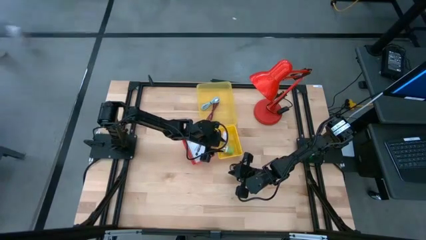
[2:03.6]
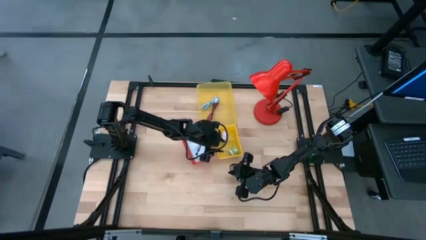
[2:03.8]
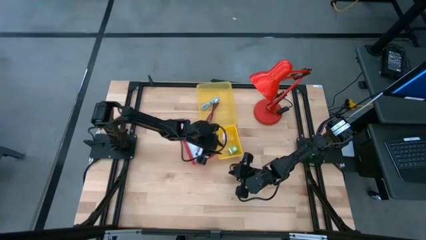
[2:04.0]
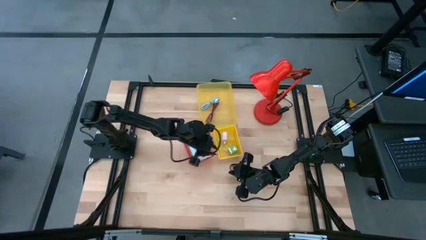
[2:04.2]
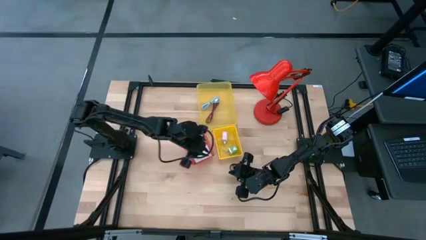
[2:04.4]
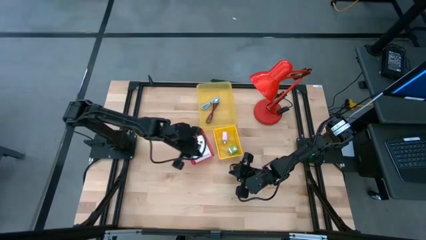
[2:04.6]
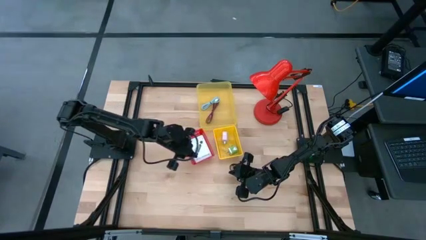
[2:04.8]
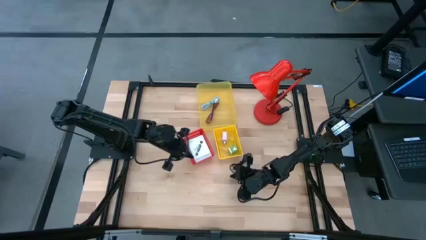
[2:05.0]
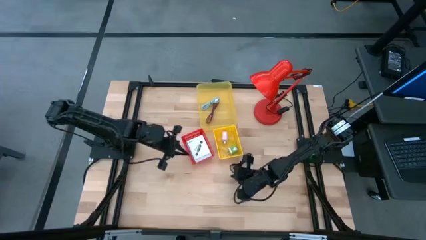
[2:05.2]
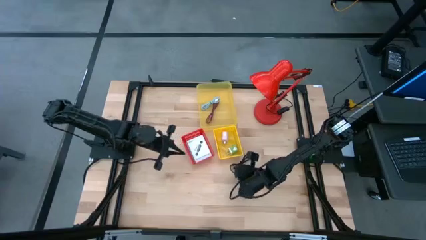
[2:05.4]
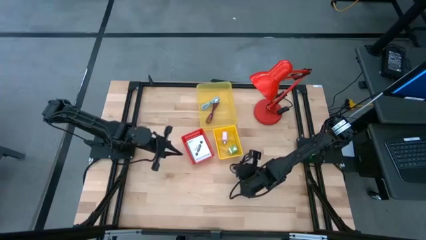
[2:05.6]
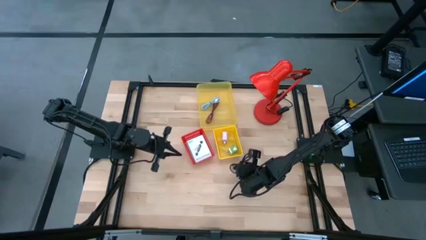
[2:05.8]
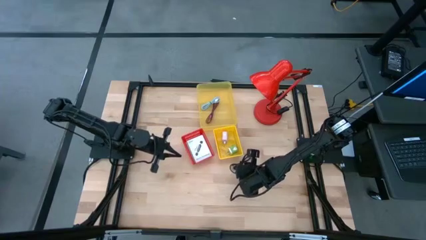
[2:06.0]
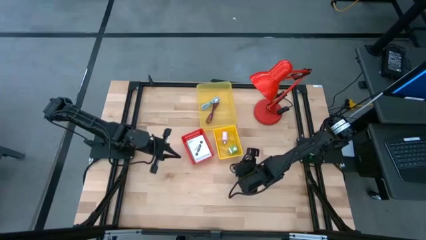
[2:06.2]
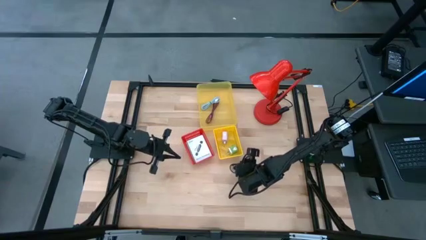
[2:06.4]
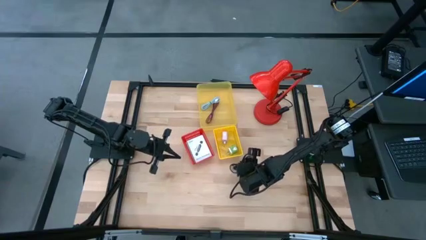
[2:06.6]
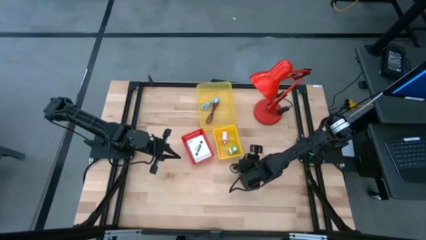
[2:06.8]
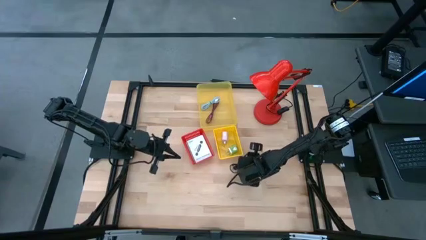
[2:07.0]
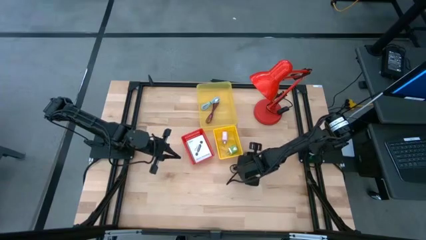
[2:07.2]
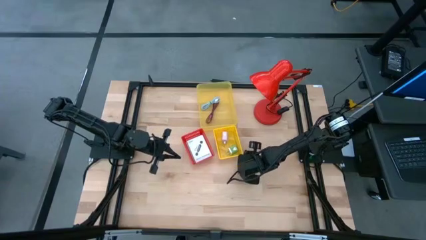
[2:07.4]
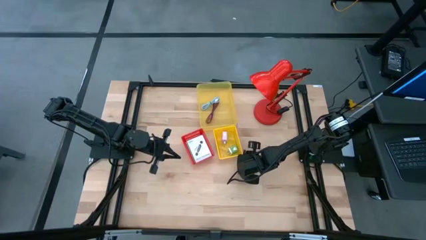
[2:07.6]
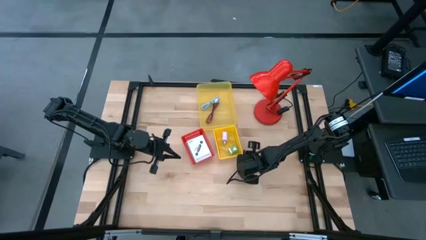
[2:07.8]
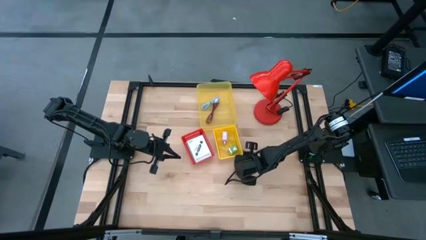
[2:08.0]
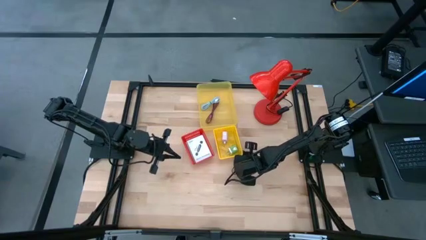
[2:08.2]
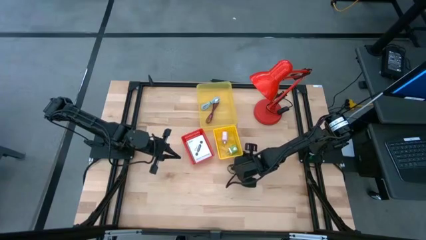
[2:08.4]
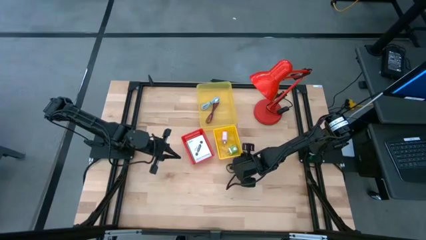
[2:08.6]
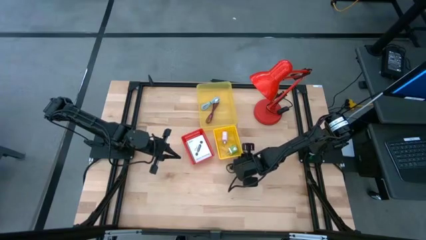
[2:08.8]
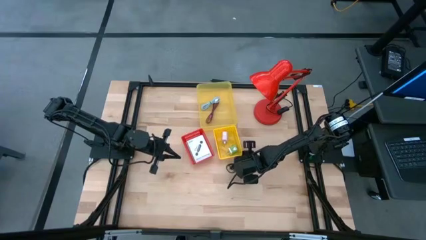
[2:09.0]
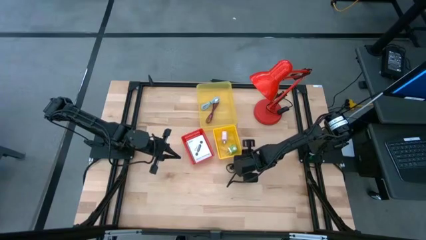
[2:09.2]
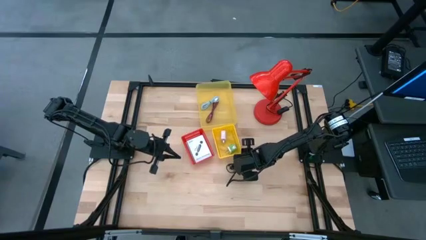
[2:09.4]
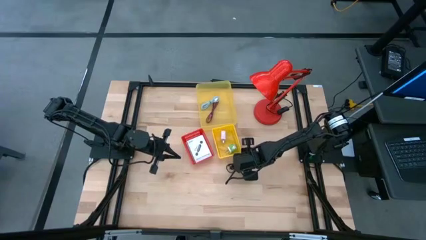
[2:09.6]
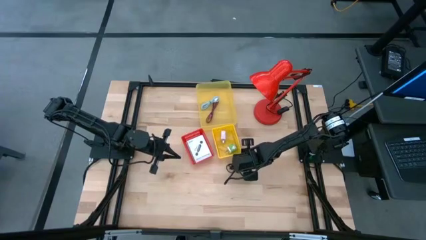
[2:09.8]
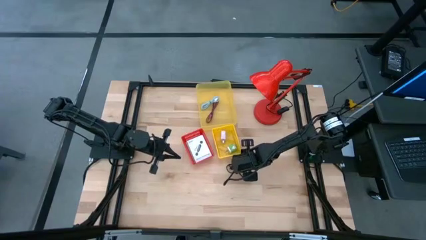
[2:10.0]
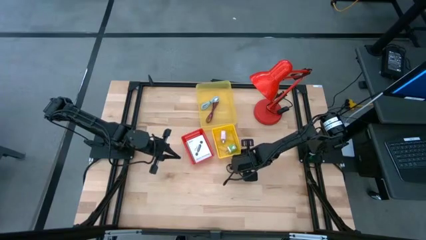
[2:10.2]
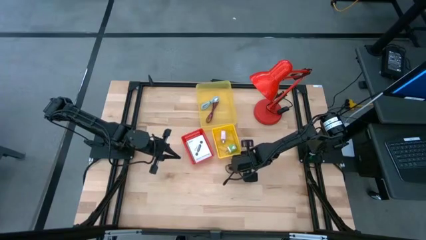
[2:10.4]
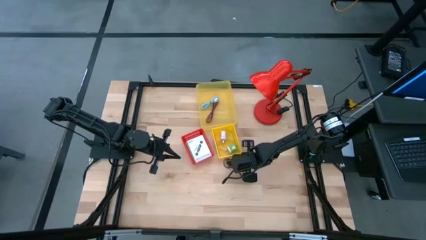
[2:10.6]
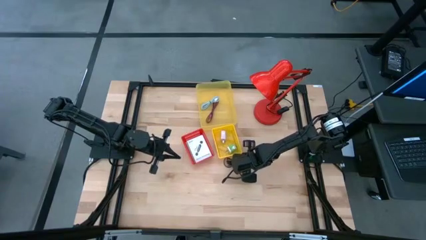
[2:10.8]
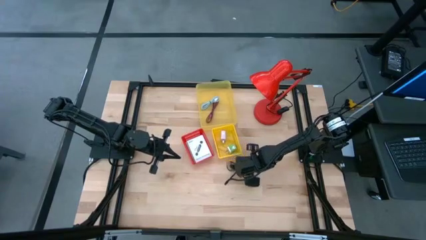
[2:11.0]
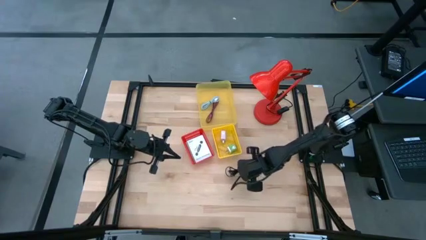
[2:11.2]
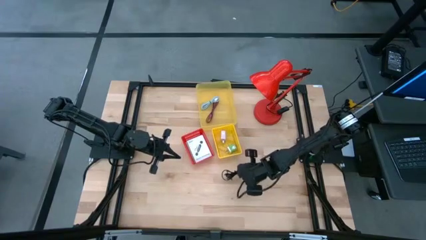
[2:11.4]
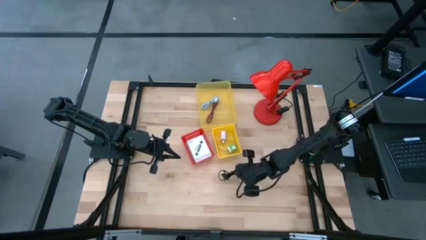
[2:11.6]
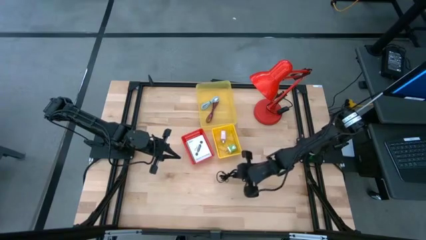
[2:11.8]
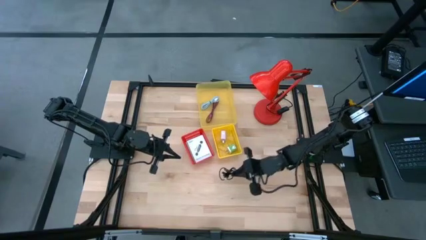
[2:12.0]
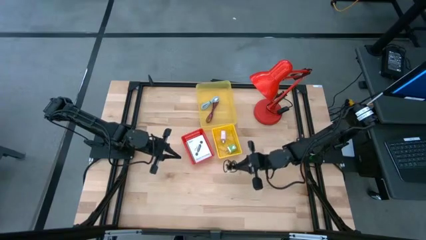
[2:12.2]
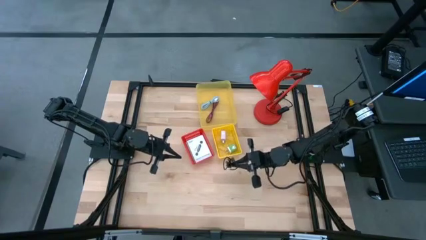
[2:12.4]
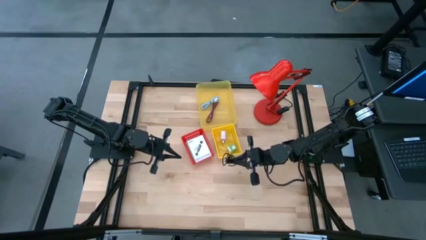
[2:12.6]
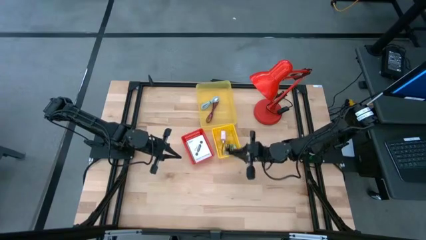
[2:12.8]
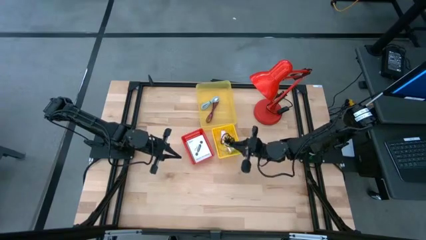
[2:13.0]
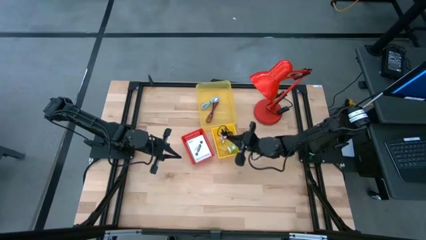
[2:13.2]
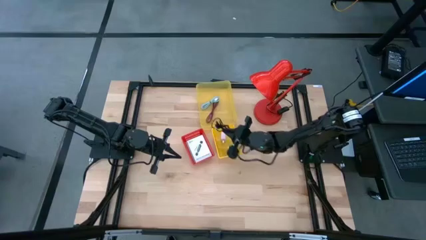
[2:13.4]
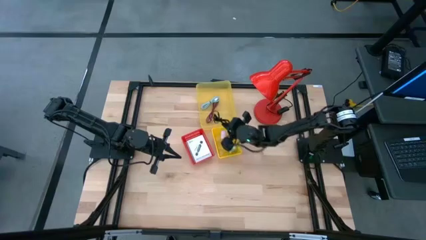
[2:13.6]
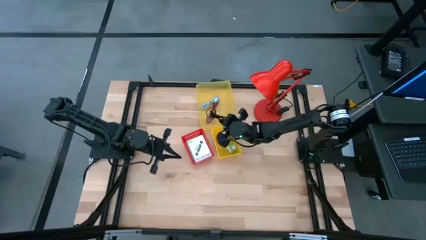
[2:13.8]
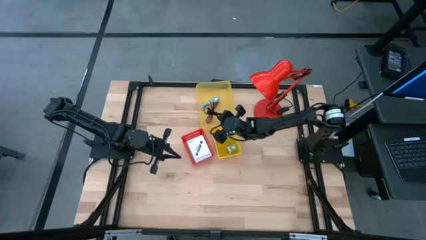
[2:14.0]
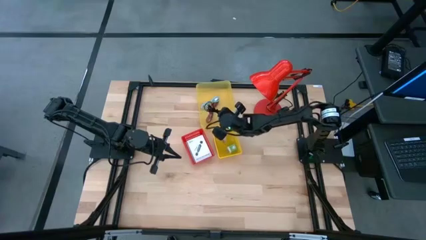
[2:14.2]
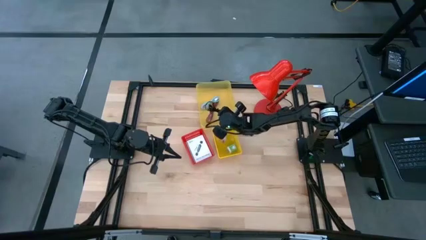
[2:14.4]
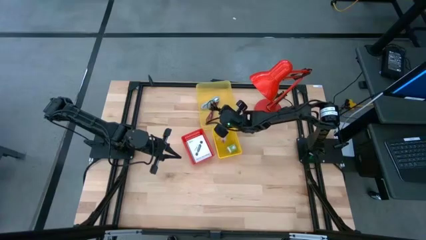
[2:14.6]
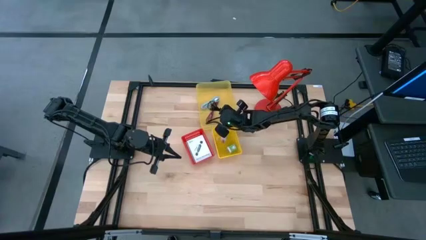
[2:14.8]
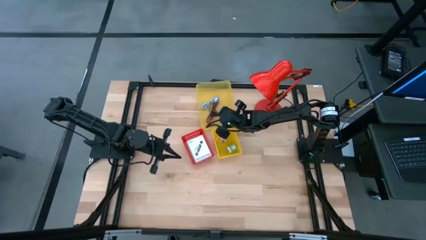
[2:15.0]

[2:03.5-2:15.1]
Task: Pick and place items into bin
Put the black cable wire into the top yellow bin

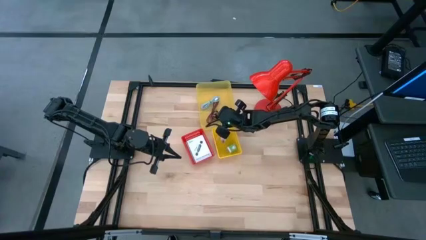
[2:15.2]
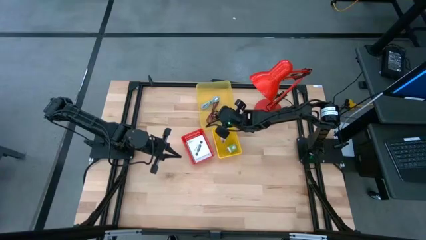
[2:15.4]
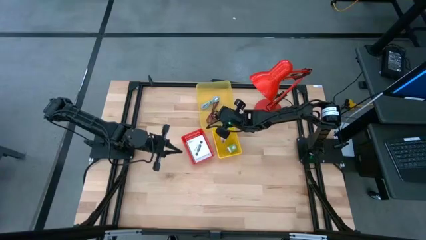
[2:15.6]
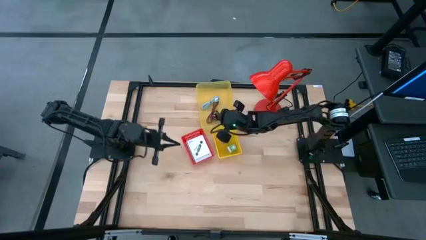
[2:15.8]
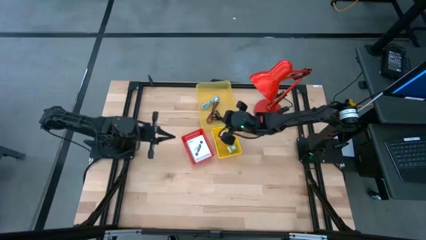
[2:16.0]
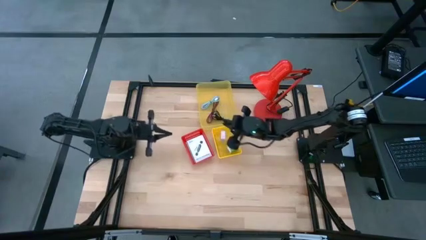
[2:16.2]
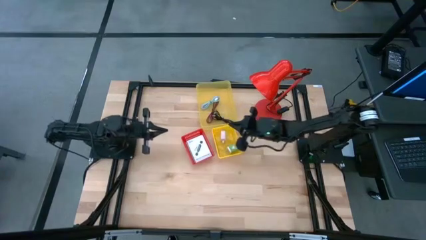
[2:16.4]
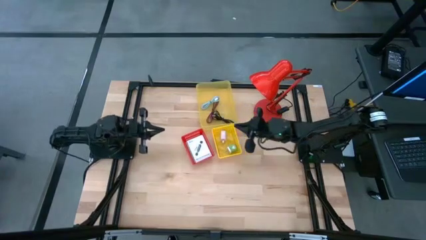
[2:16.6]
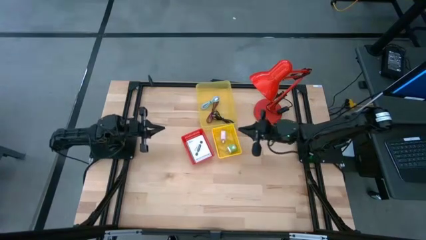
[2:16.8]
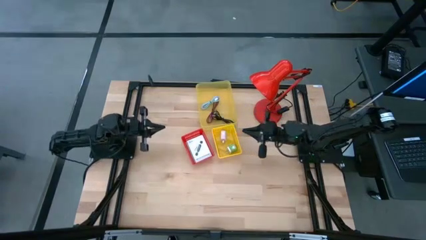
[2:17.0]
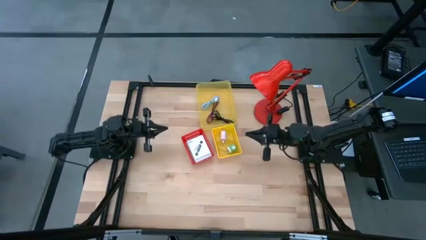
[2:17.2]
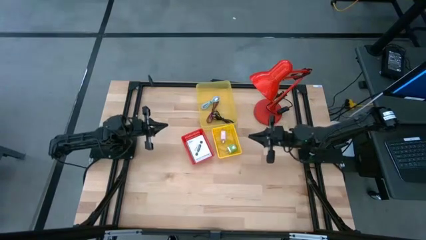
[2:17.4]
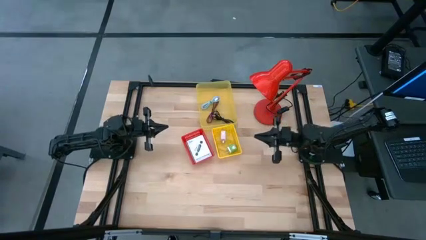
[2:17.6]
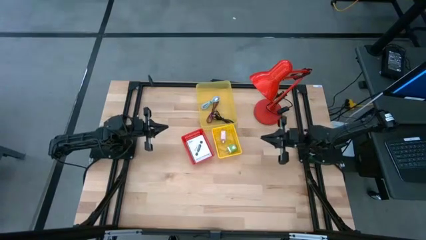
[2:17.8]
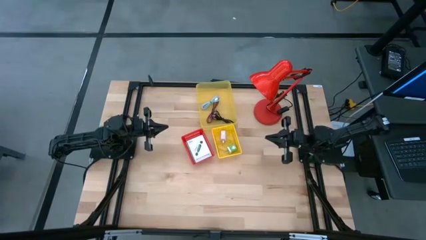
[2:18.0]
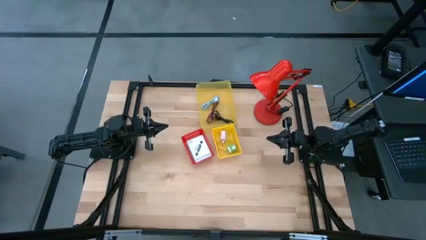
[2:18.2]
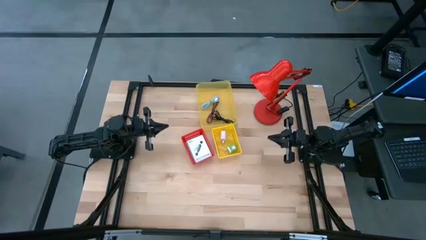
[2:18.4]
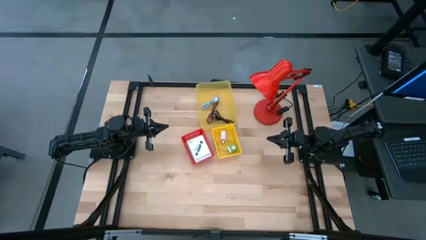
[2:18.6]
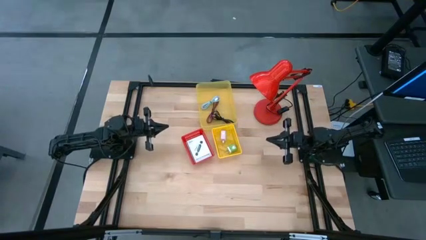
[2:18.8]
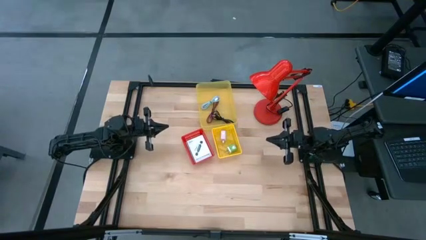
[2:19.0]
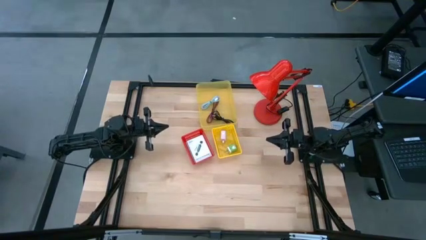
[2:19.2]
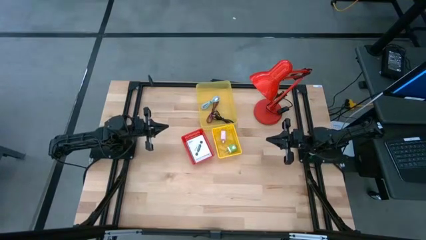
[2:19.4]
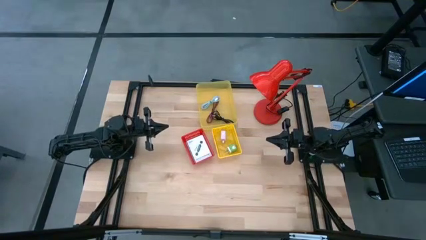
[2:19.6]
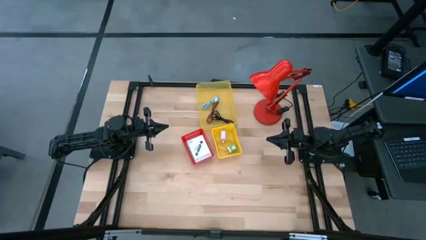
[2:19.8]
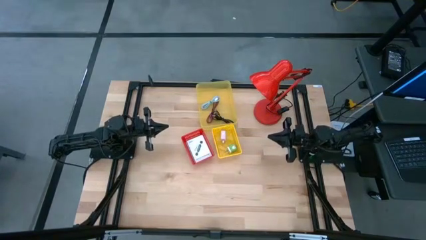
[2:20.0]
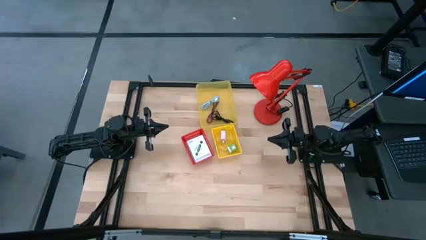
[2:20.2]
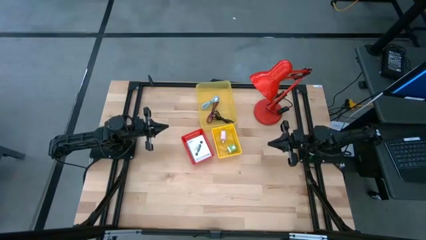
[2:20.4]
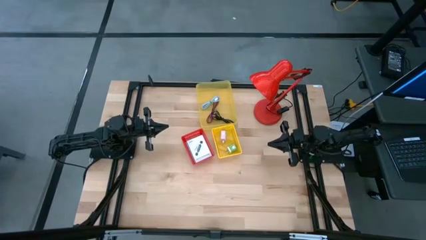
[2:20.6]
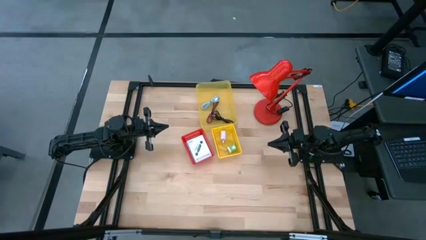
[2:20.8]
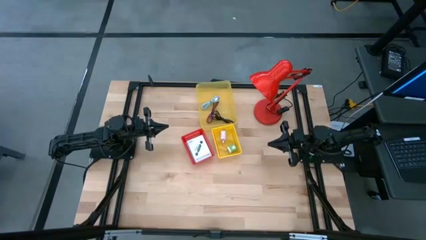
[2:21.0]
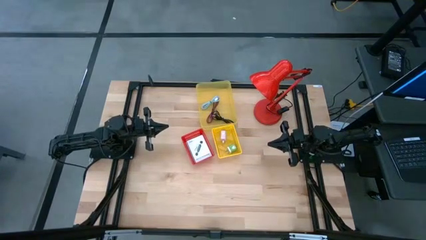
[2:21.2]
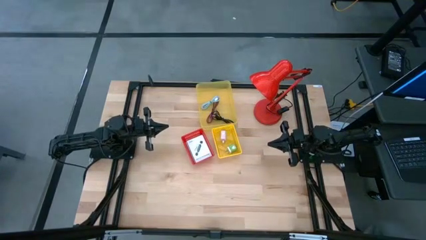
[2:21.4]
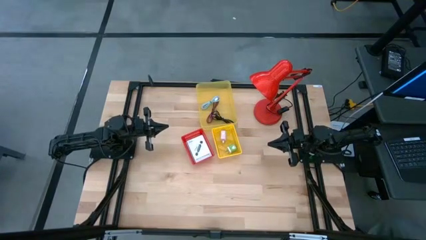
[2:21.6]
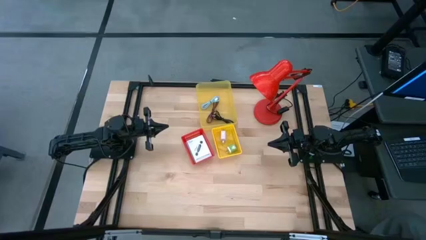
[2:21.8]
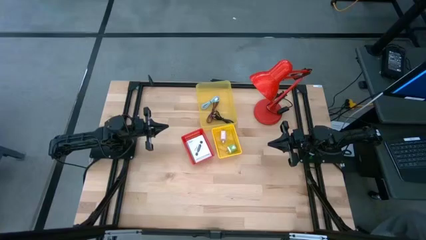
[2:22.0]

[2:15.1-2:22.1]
Return to Home Position
